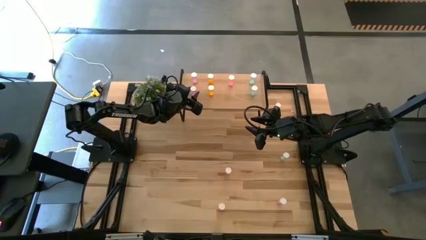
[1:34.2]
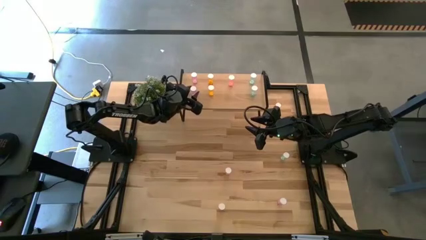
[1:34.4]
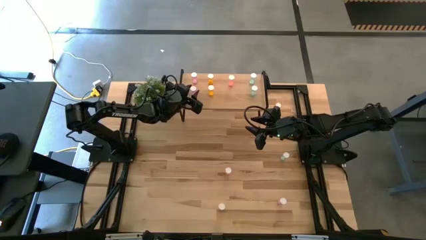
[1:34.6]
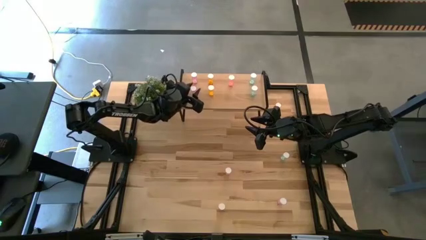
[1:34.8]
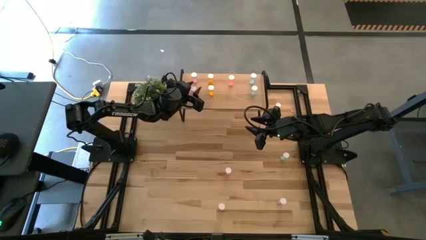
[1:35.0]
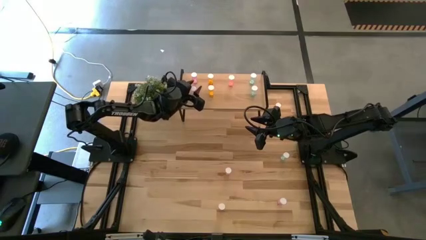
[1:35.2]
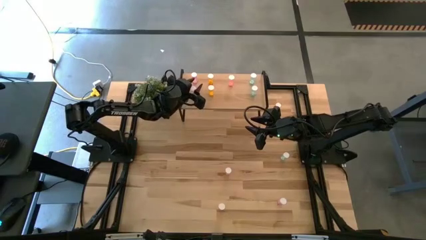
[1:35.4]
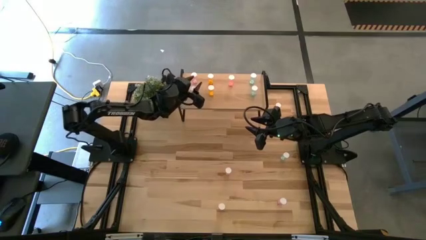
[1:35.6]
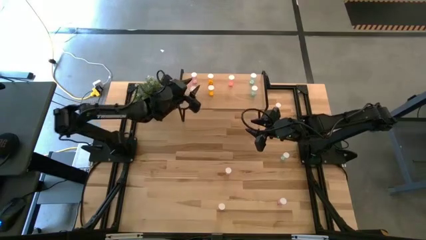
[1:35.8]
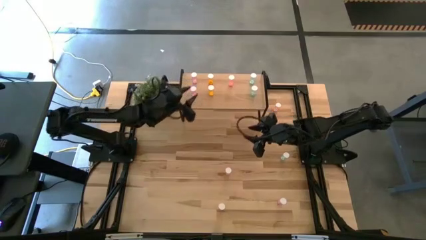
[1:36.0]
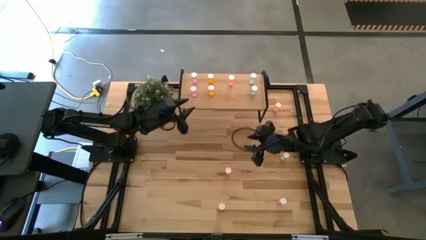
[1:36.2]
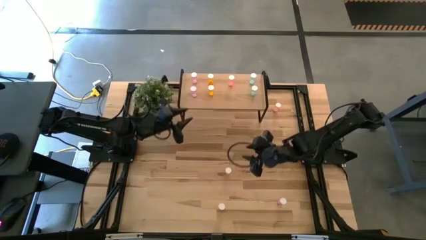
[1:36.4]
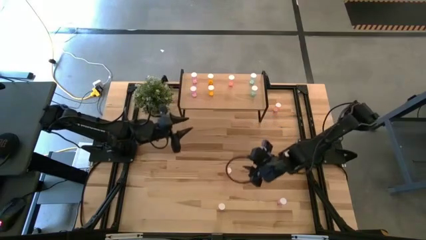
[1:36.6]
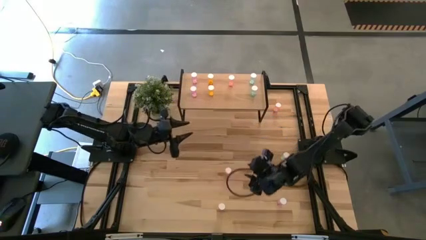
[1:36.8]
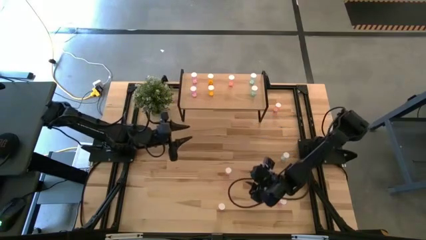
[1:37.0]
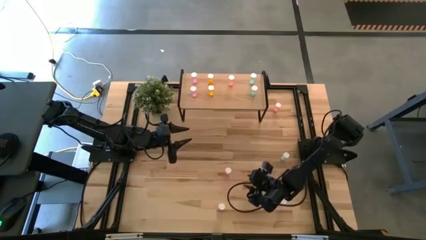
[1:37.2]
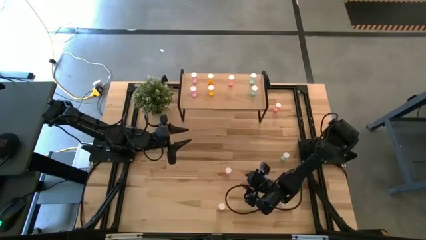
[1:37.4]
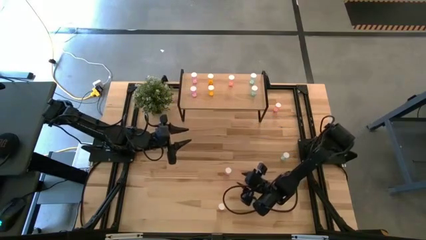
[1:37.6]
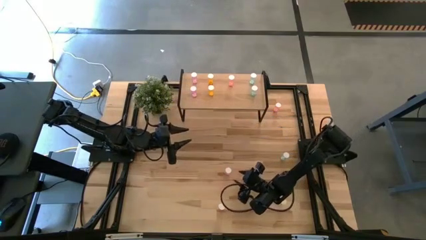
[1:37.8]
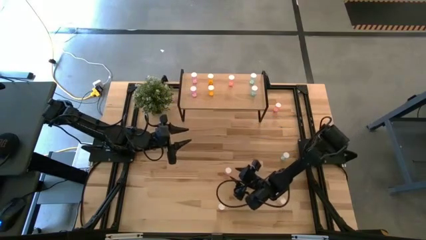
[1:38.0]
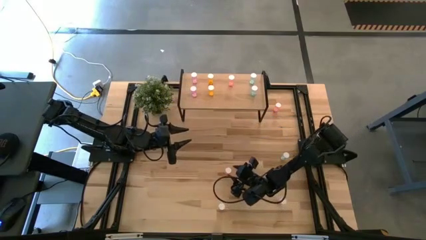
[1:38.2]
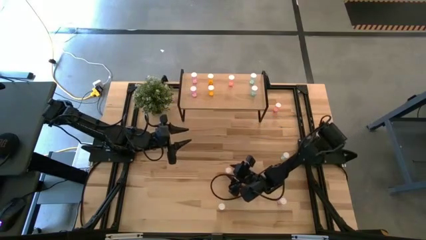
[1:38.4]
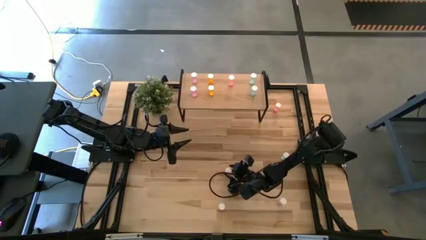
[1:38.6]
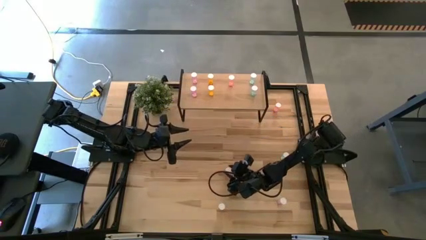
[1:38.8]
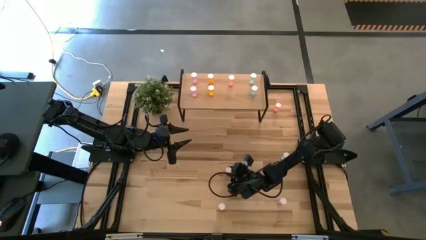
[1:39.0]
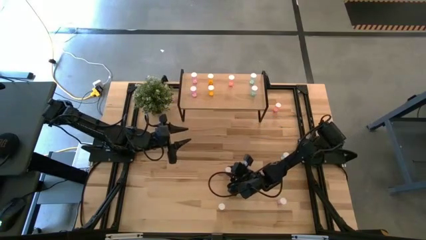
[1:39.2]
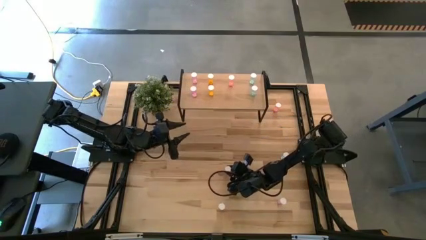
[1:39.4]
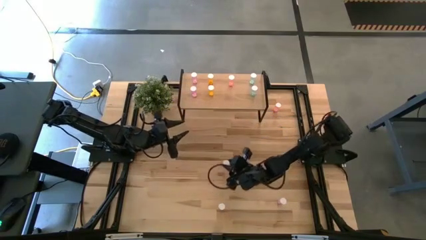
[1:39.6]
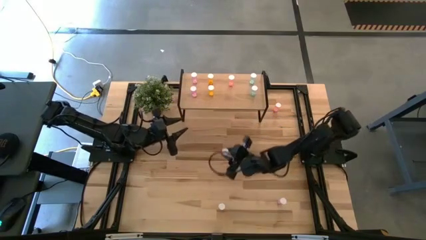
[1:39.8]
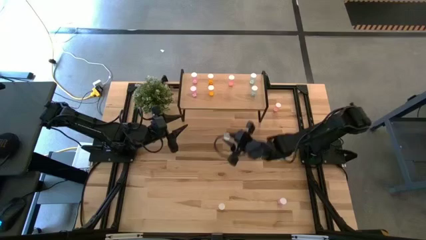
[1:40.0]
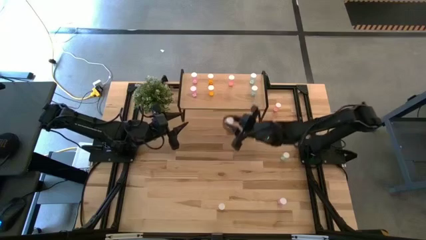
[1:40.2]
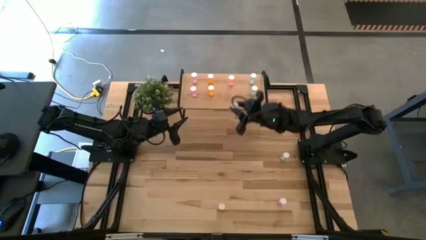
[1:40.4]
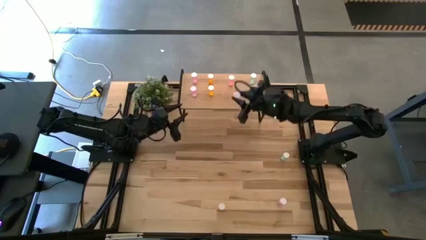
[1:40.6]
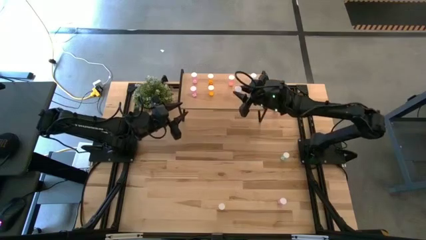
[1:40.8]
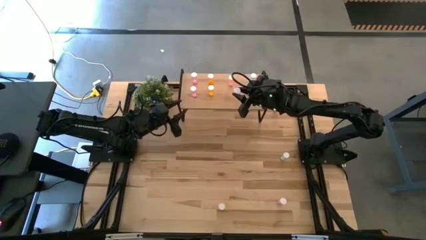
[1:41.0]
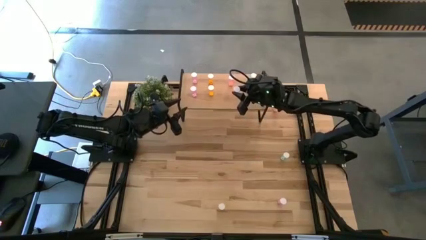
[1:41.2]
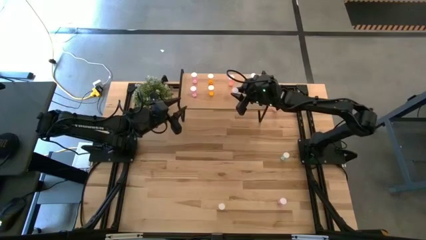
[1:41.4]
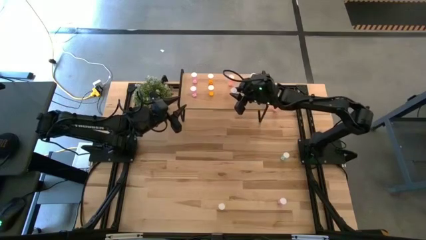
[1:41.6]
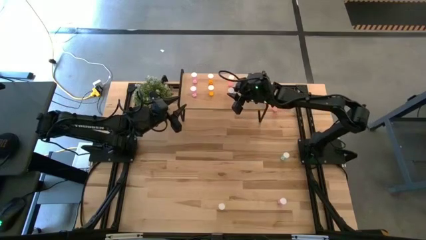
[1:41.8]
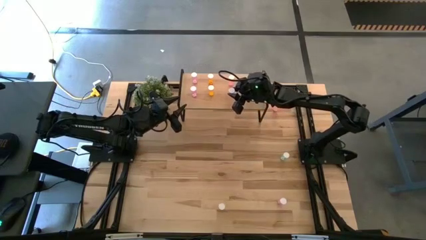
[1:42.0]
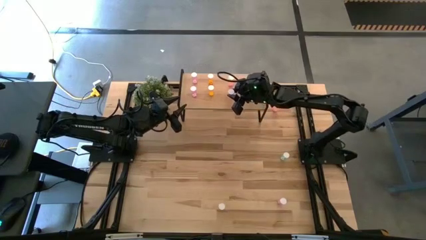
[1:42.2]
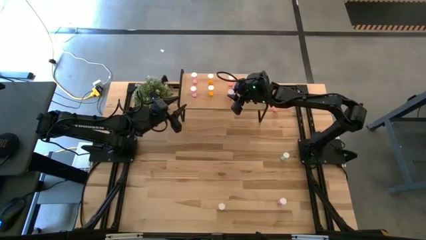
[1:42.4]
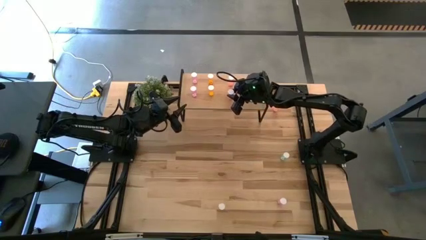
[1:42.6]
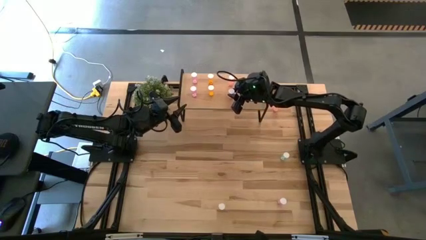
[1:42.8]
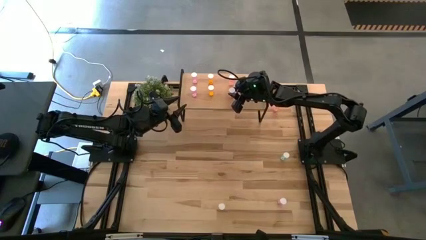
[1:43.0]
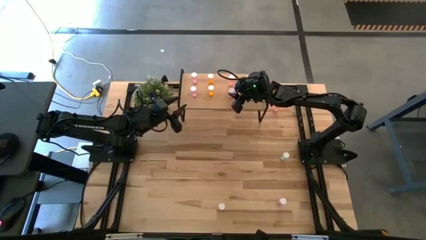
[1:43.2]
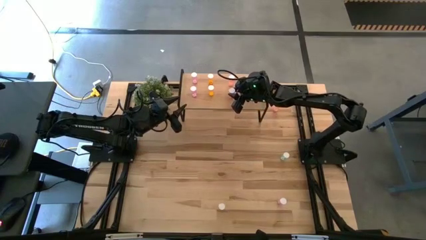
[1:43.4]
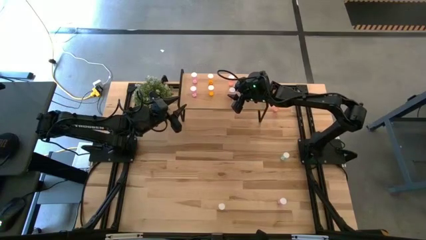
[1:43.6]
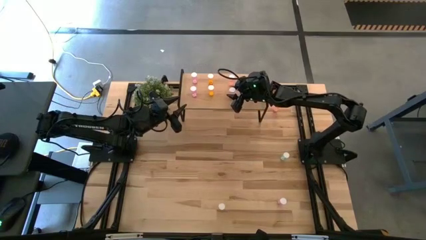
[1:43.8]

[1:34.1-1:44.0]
Task: Pick and place medicine bottles onto shelf by color
Put the bottom red pill bottle aligned with the other red pill bottle on the shelf
